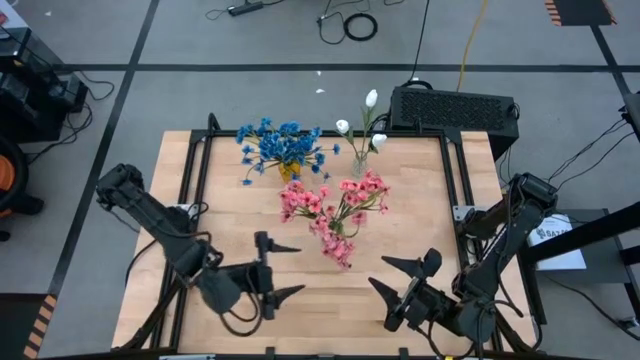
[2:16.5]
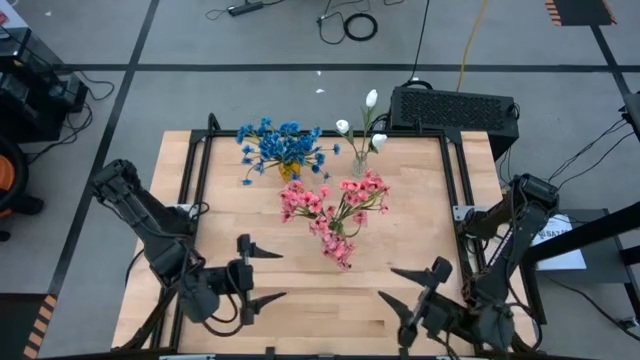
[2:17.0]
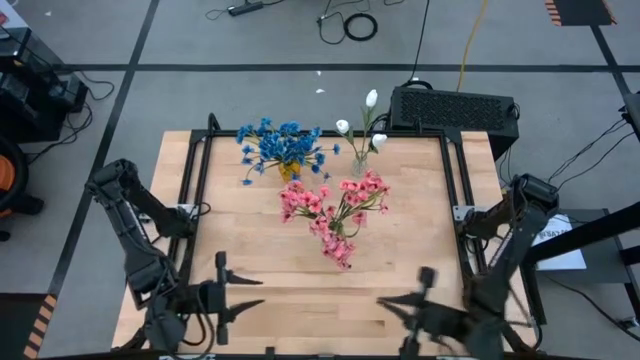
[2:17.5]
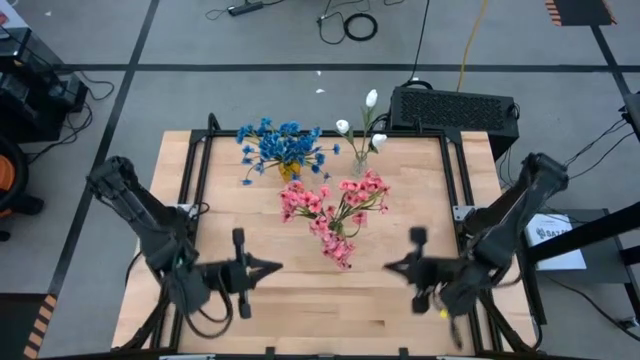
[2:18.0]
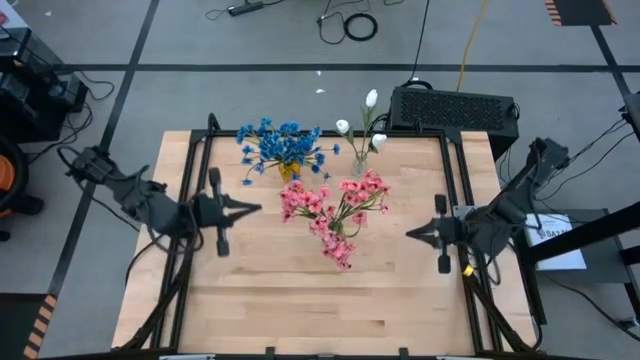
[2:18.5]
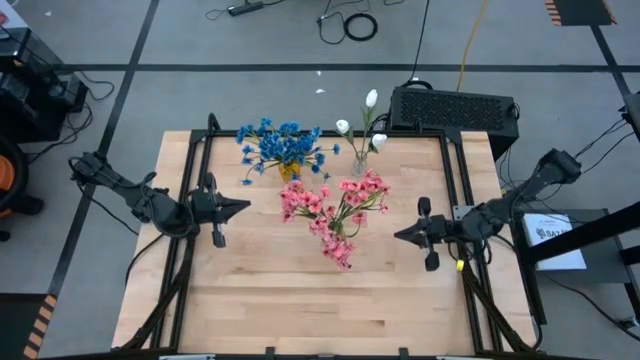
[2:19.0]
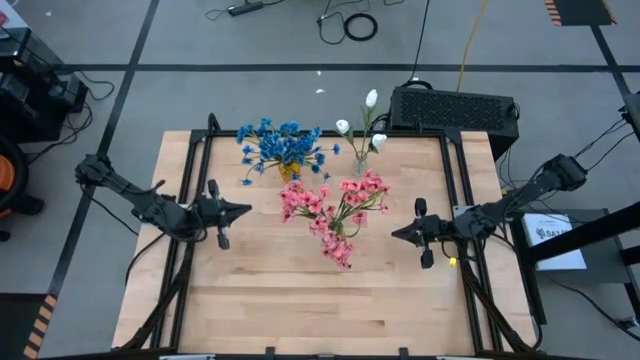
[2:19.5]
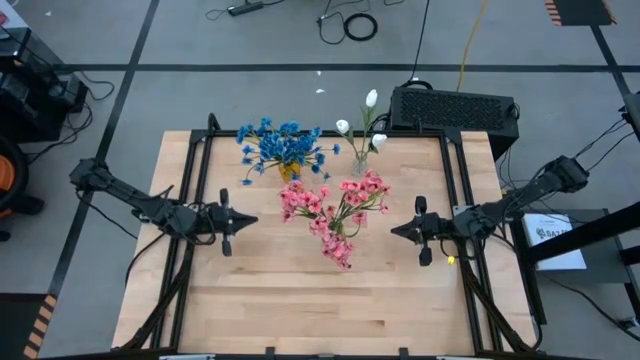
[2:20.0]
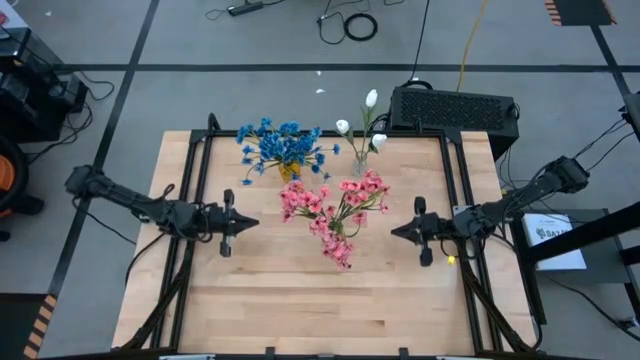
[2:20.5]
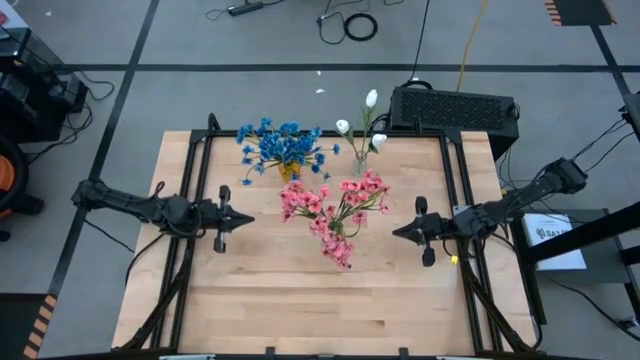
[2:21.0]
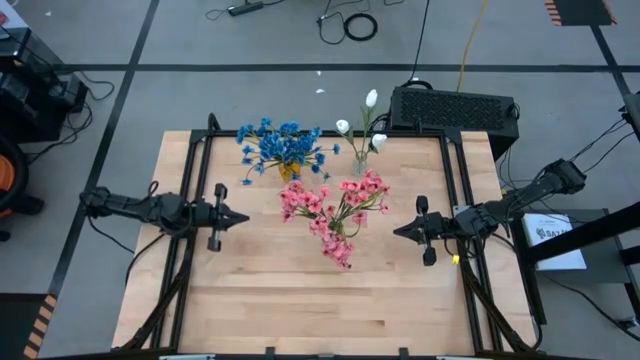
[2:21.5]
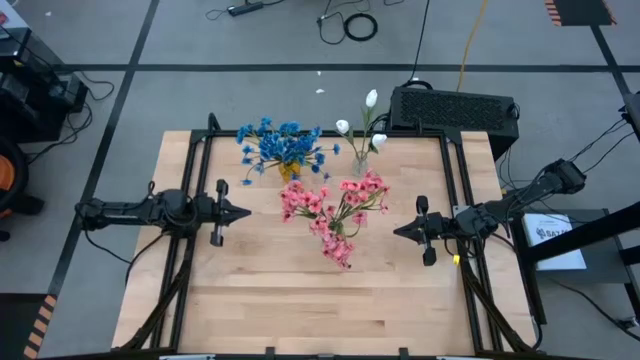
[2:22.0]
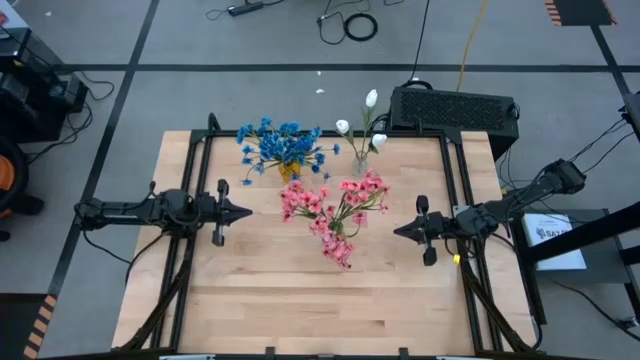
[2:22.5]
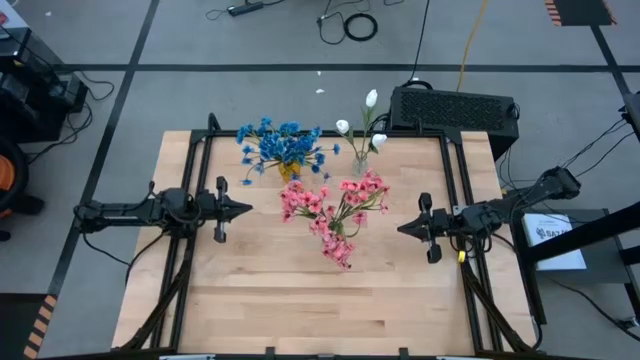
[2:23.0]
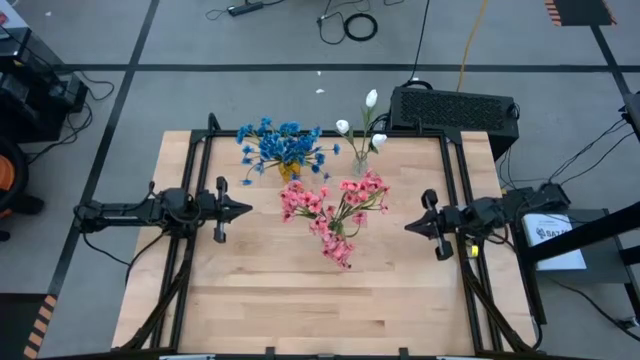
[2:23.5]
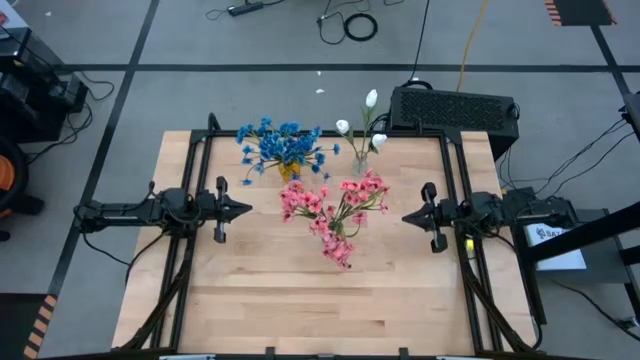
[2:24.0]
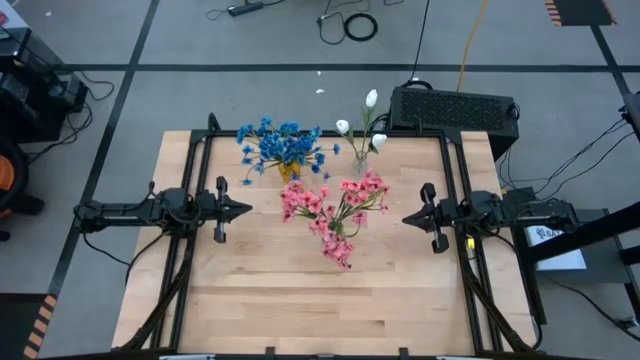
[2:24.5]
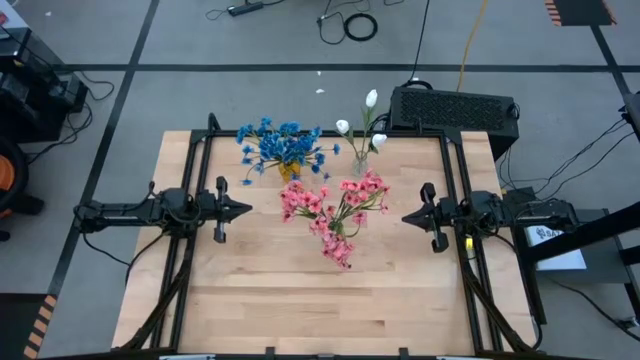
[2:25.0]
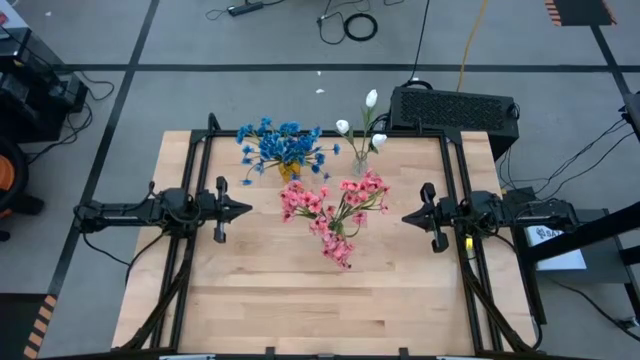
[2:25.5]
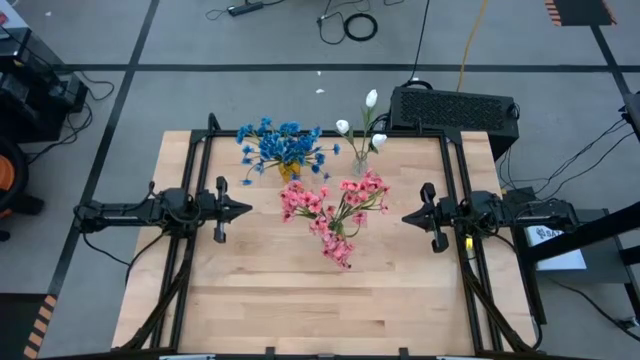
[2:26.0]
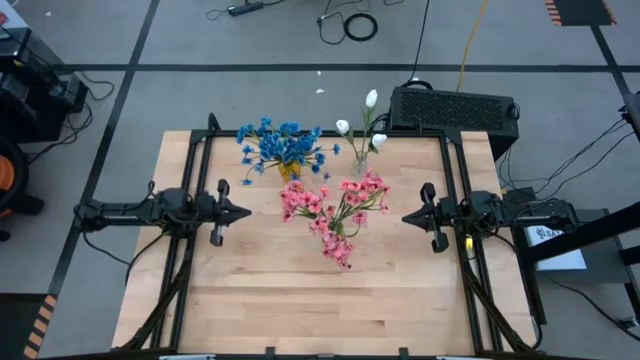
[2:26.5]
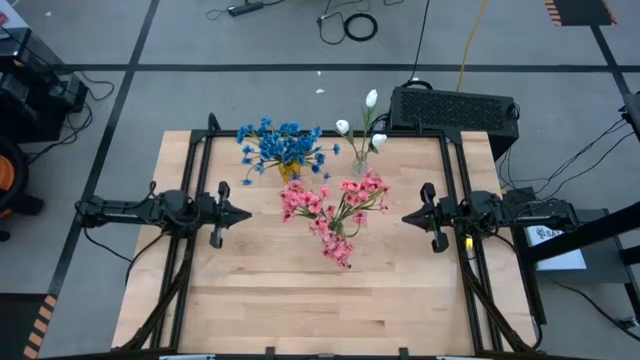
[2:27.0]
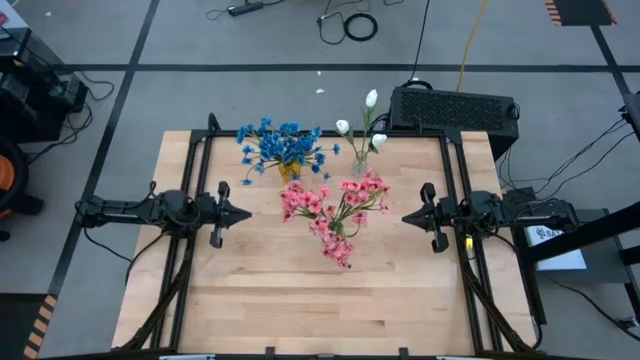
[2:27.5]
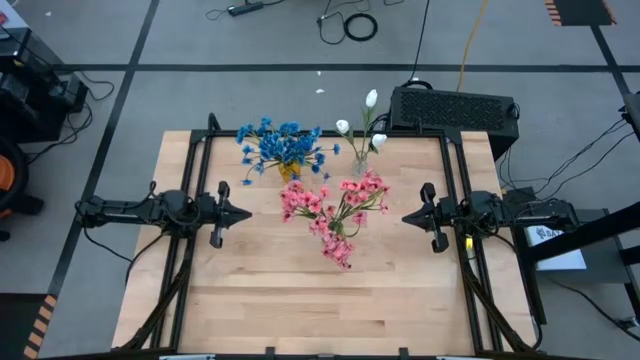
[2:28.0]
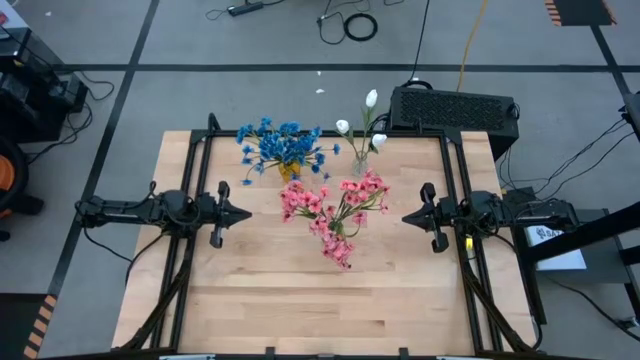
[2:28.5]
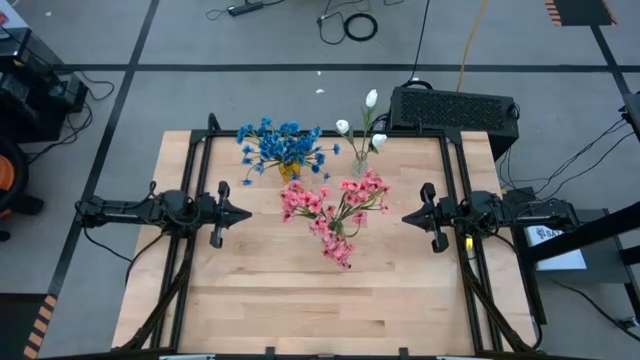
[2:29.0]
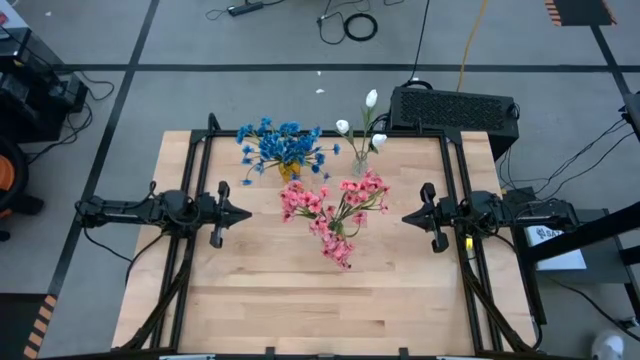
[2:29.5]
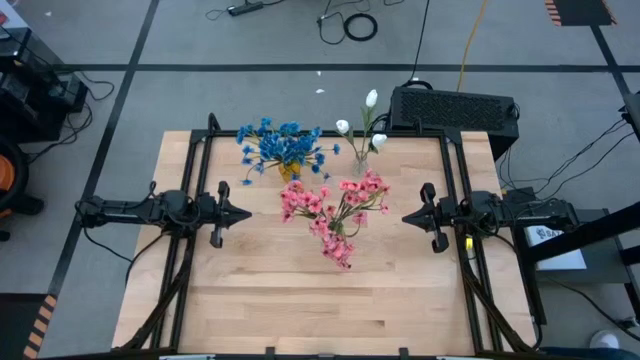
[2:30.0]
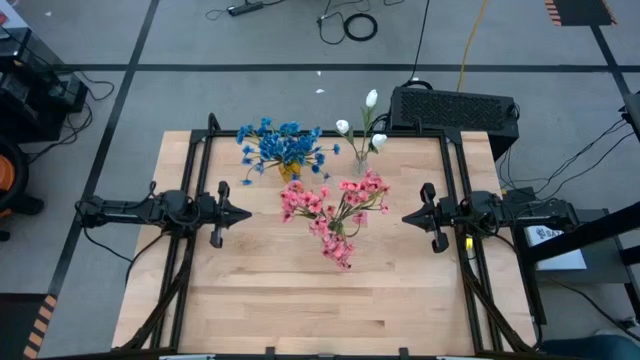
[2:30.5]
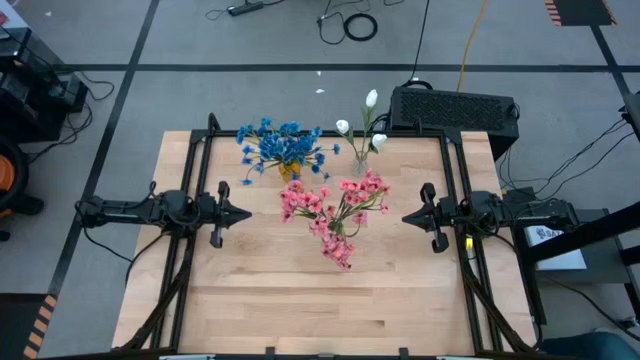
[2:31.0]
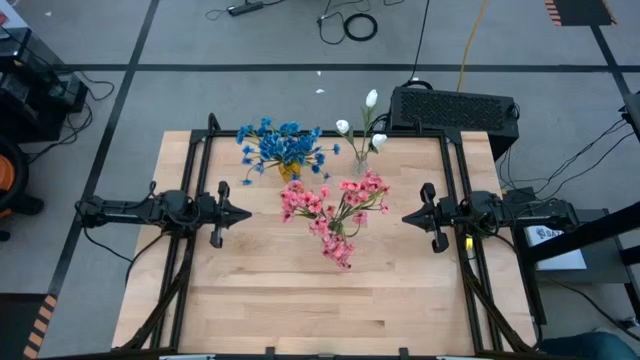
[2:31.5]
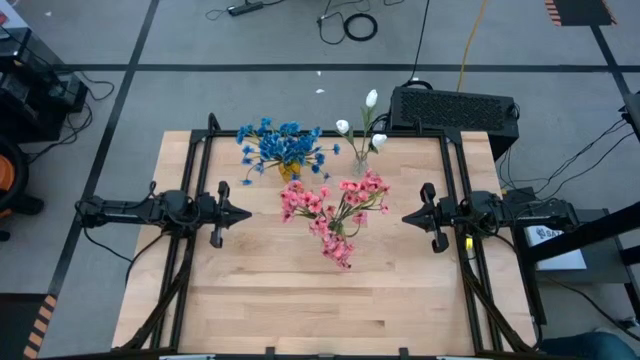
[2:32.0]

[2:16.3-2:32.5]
Task: Sort flowers into vase by color
Return to Home Position

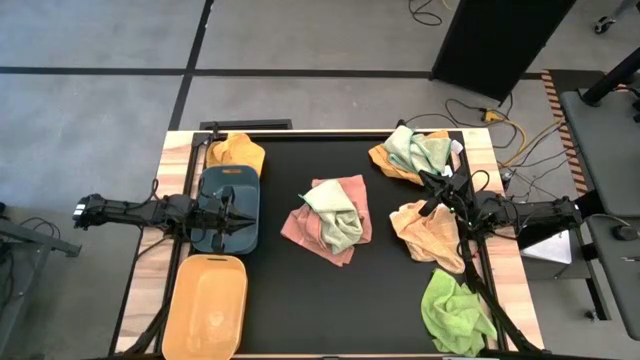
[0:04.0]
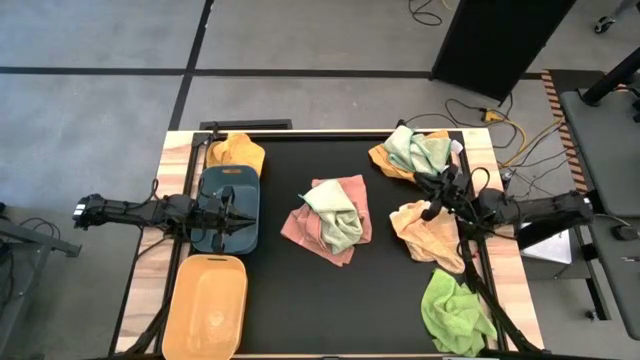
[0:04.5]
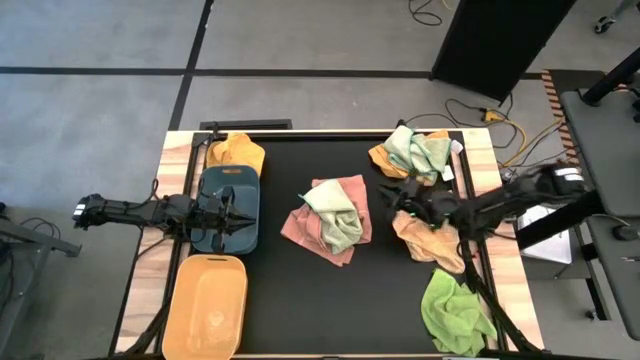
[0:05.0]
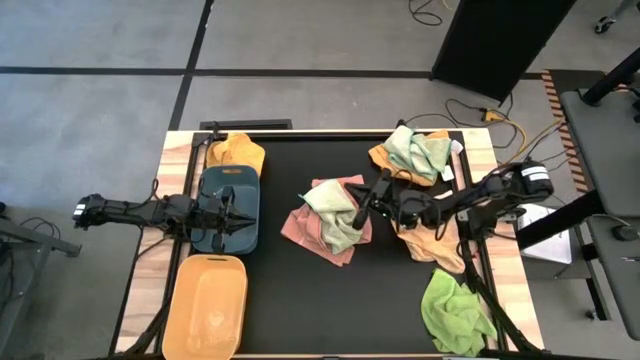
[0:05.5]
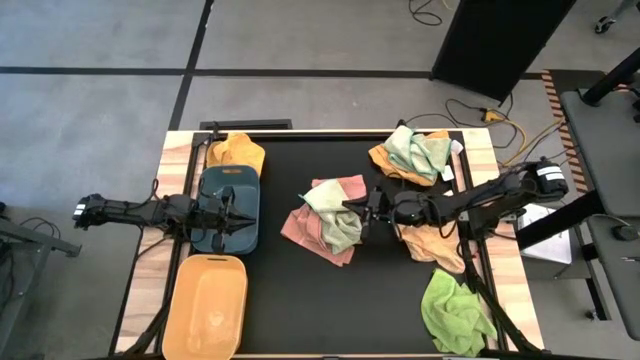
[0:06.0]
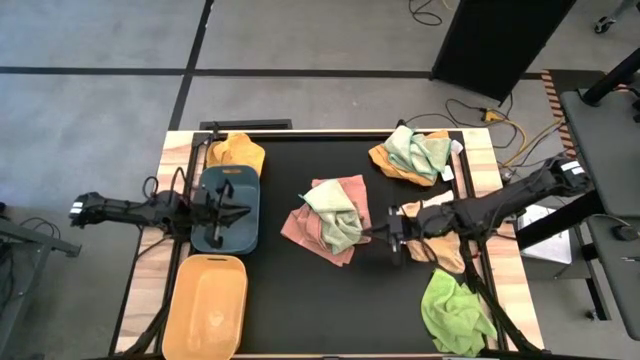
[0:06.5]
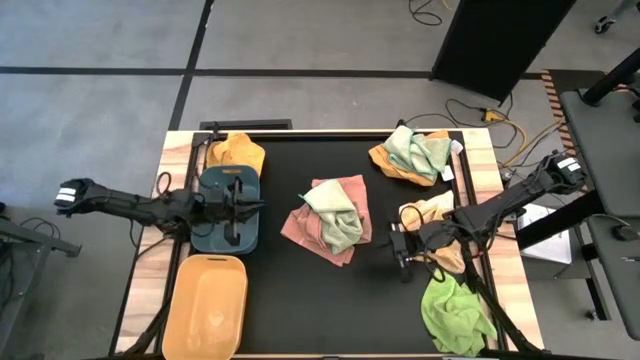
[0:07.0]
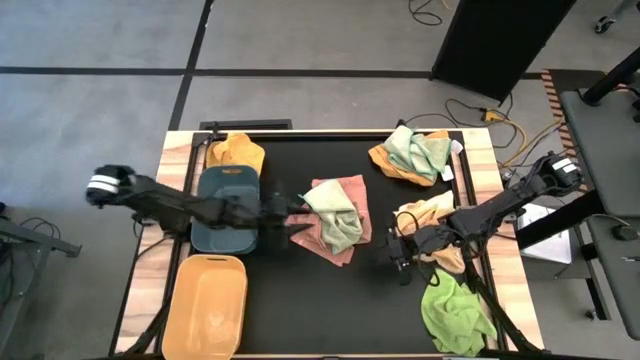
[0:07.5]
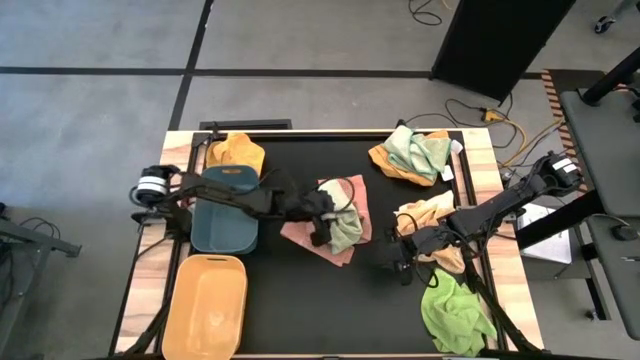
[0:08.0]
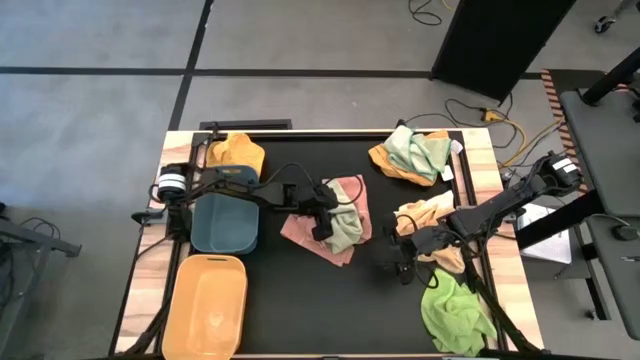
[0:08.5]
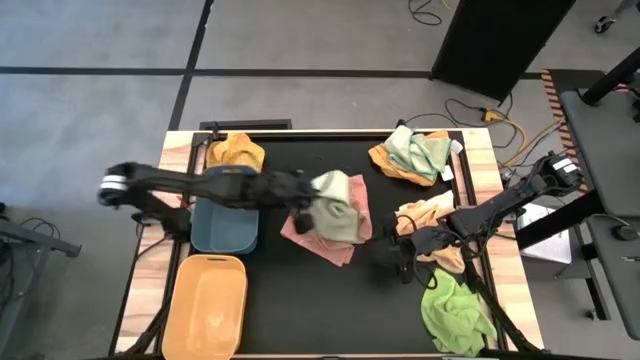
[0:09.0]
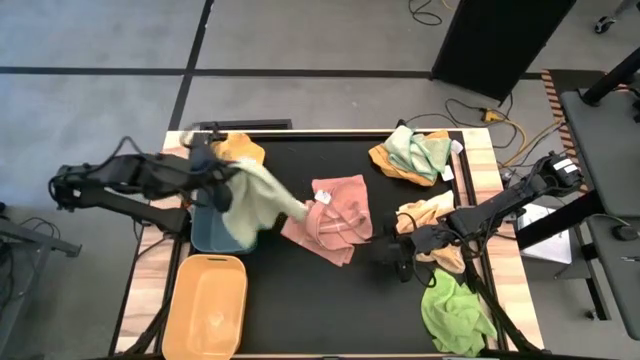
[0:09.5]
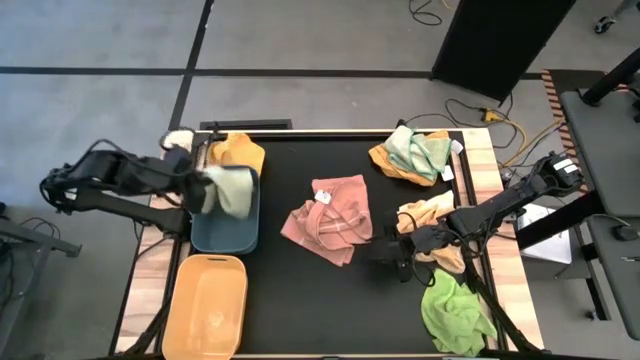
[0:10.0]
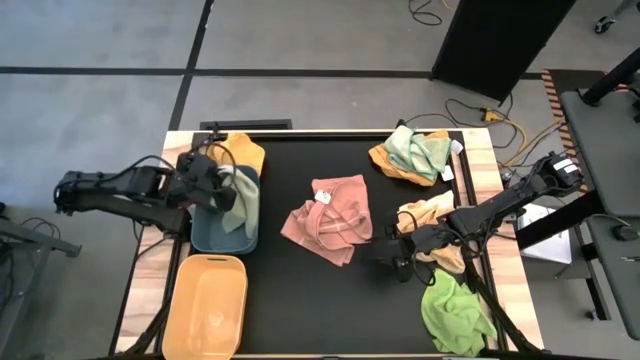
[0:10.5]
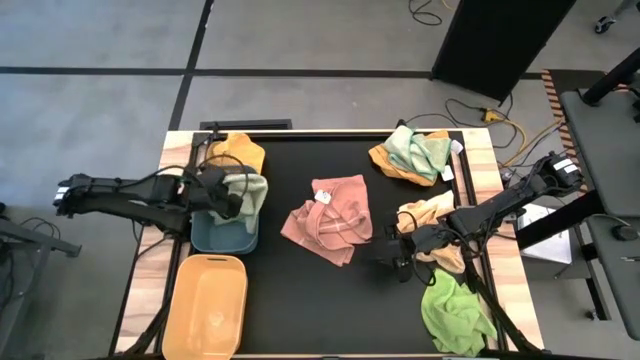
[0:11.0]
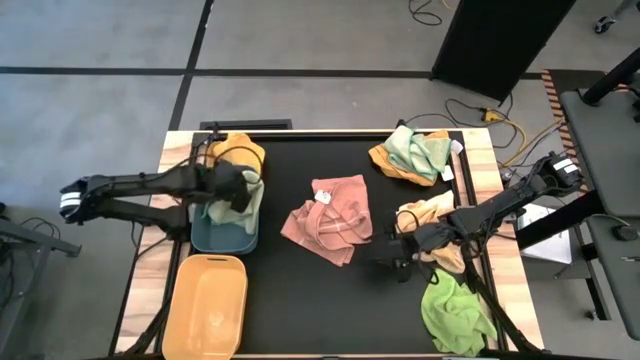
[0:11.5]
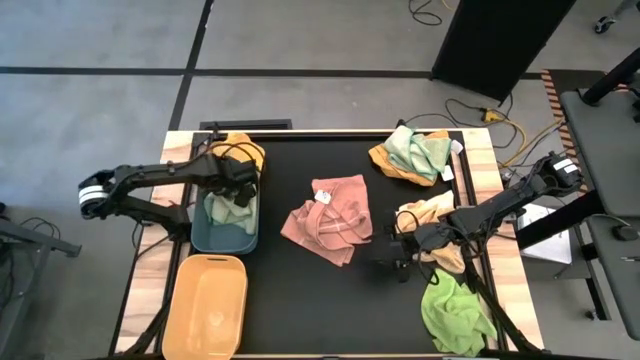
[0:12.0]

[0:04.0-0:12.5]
Task: Sort towels by color in basket
Put the bottom light green microfiber towel into the blue bin
